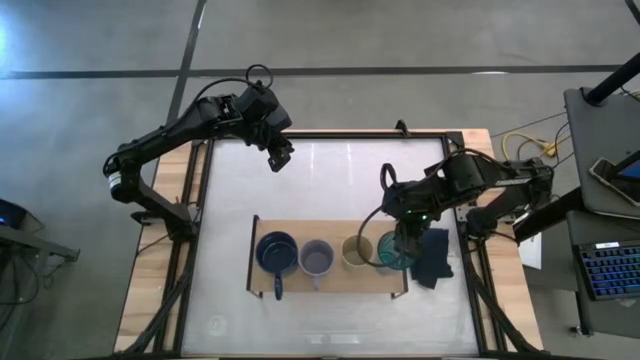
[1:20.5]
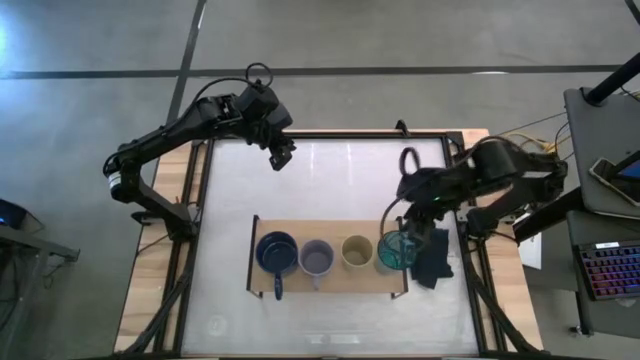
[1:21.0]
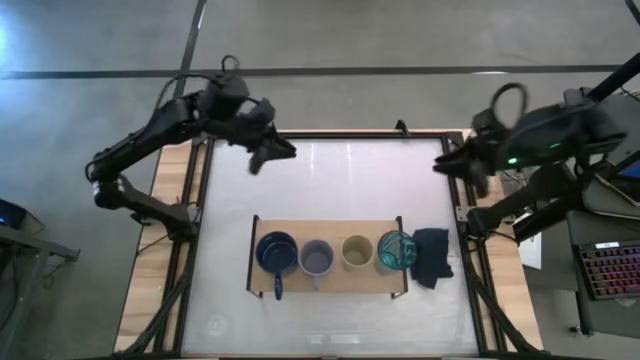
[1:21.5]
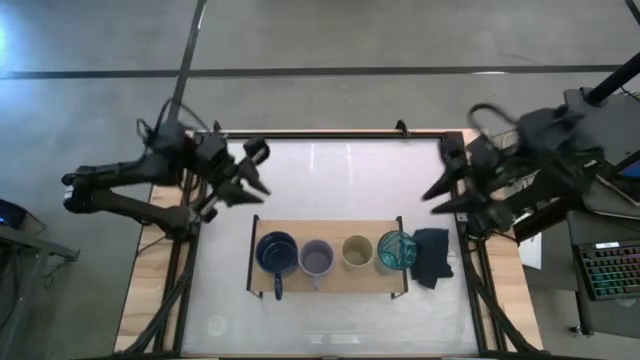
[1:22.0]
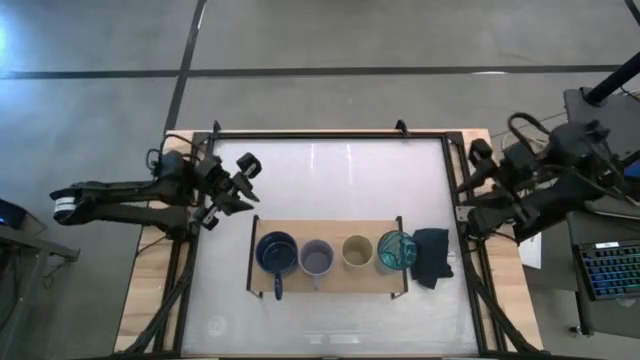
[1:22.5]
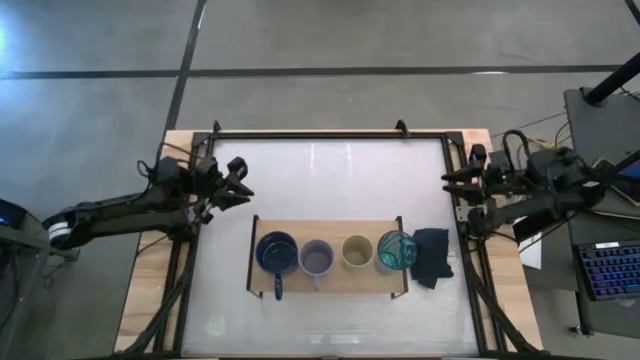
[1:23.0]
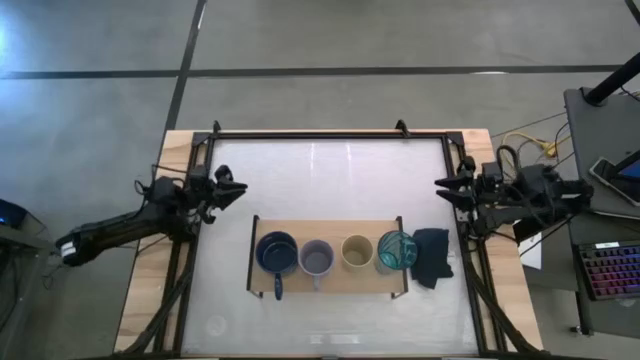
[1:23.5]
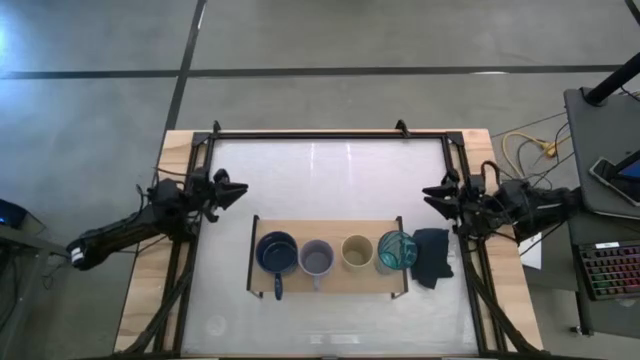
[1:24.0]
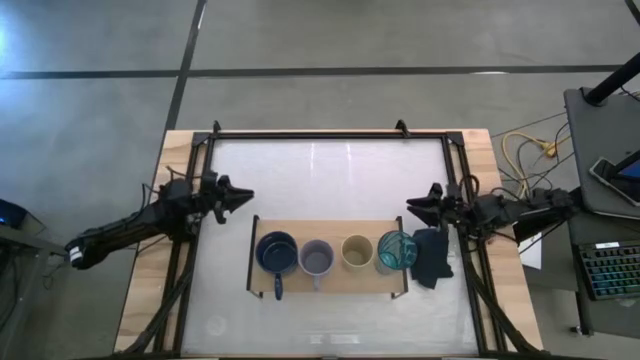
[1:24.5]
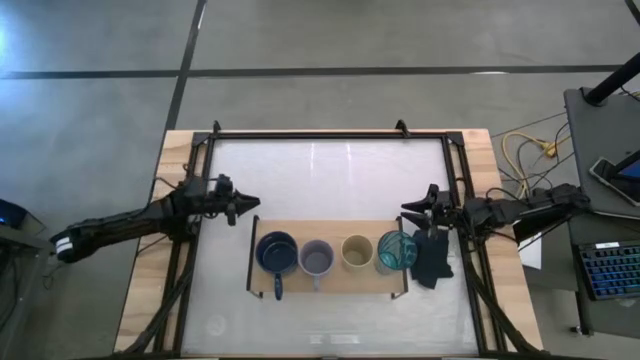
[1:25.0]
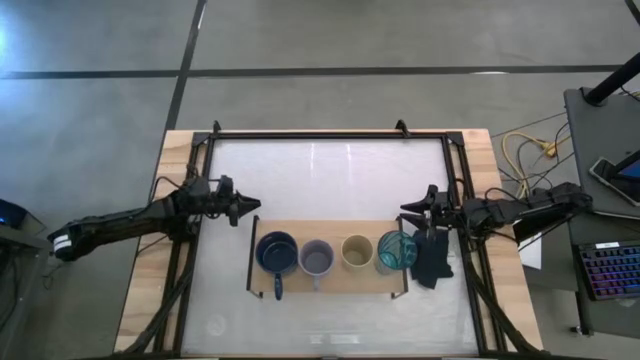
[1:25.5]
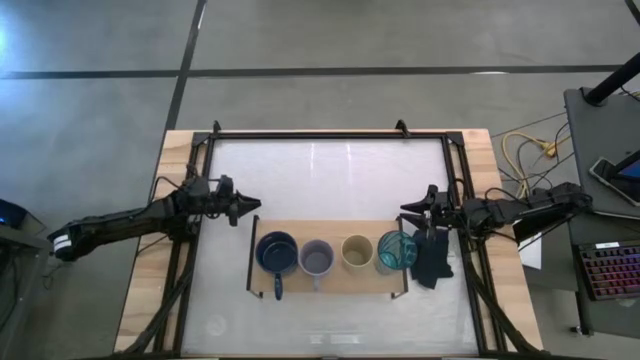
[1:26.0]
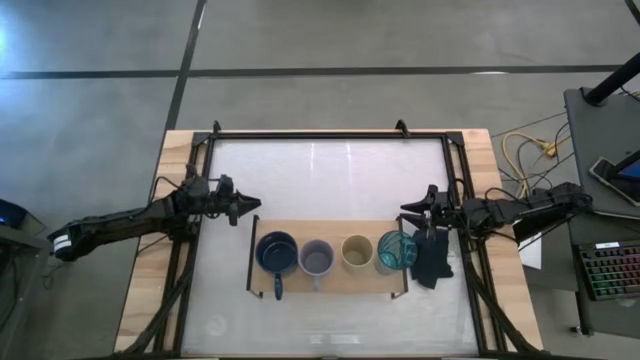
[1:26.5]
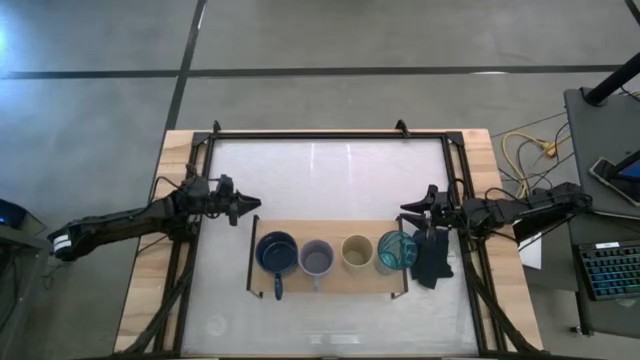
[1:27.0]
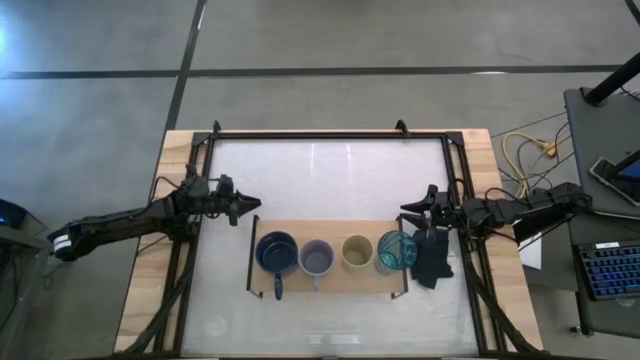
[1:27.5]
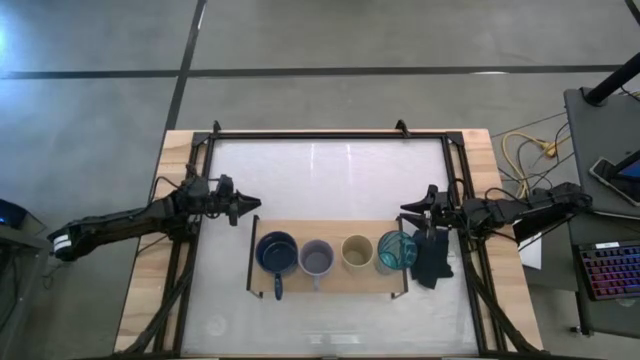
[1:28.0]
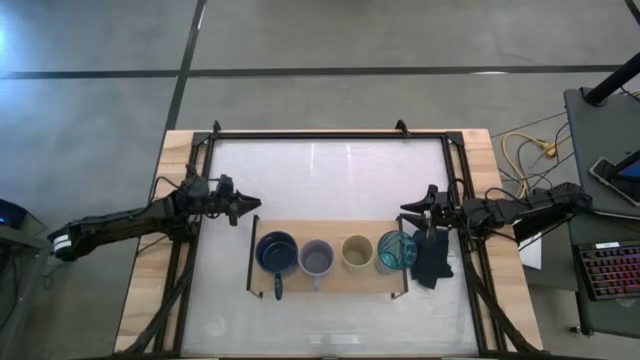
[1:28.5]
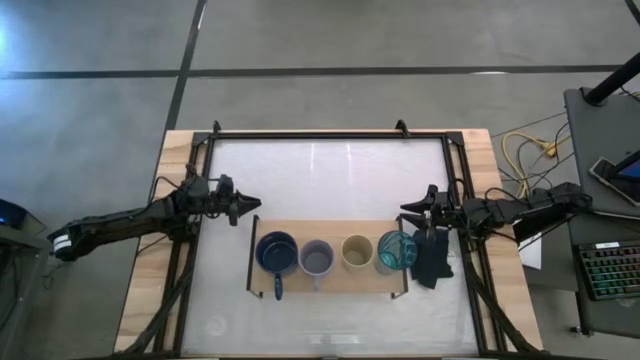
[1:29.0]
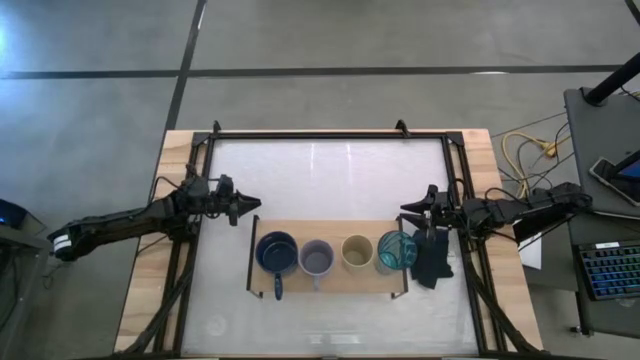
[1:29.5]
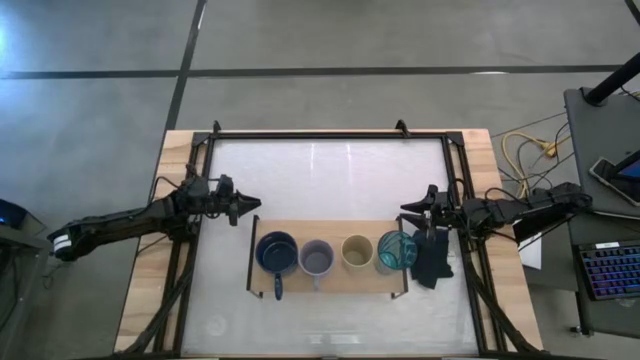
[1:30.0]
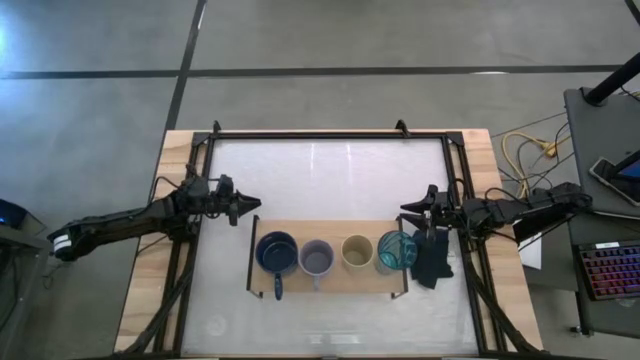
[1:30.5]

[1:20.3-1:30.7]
Task: Stack small to large cups/mugs on shelf
Return to Home Position

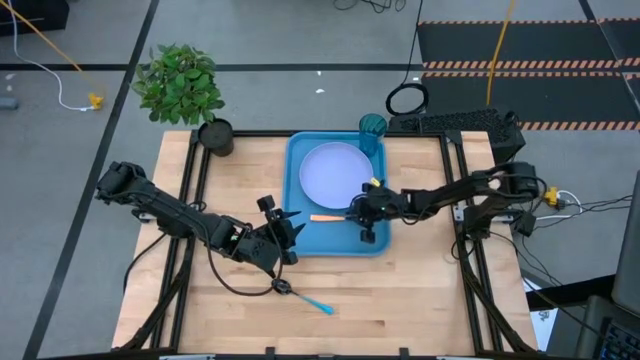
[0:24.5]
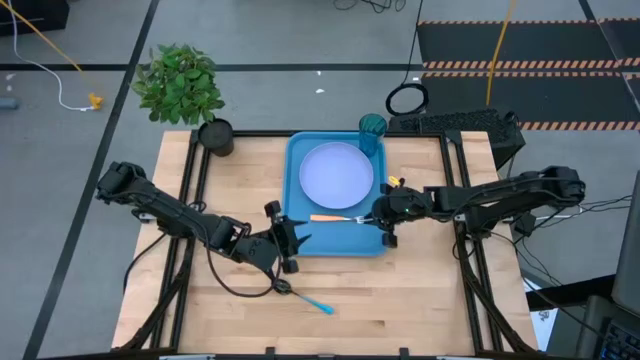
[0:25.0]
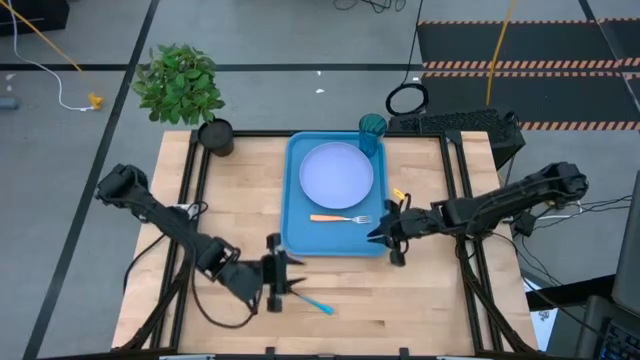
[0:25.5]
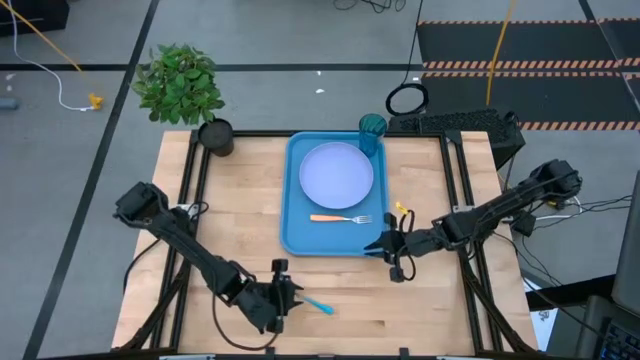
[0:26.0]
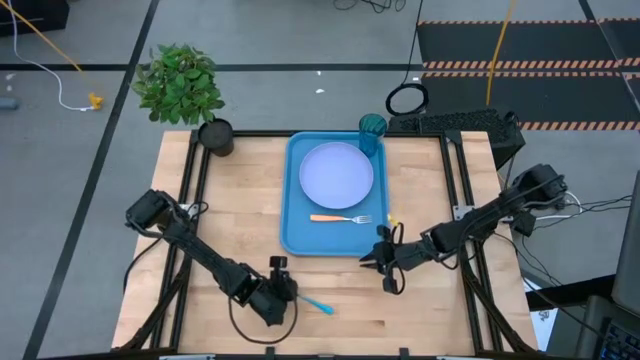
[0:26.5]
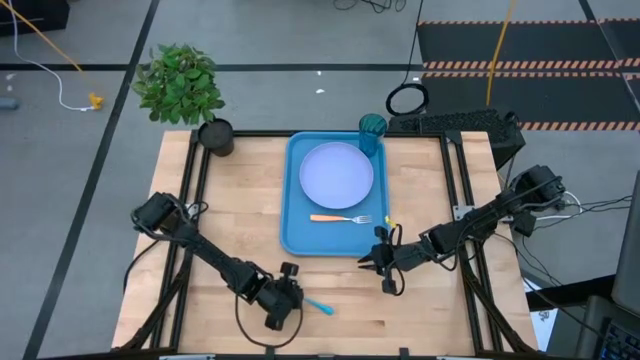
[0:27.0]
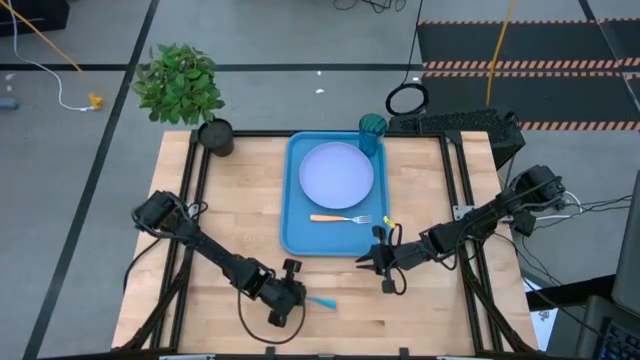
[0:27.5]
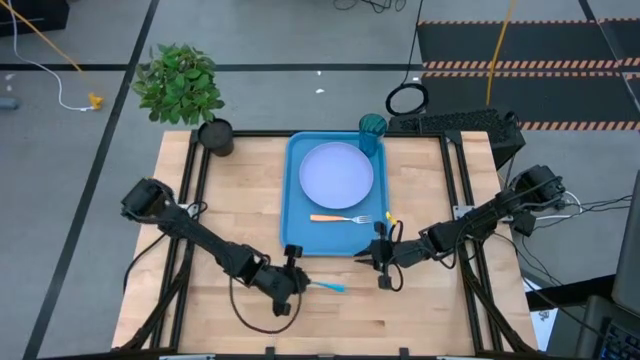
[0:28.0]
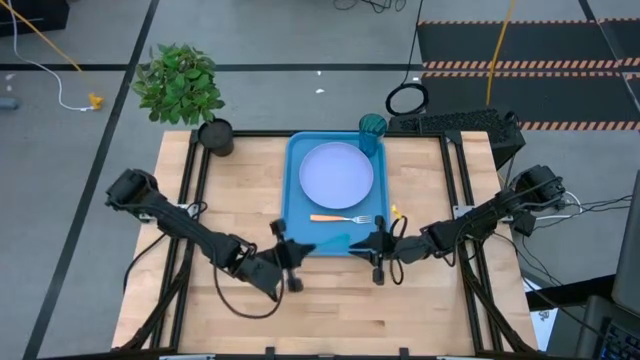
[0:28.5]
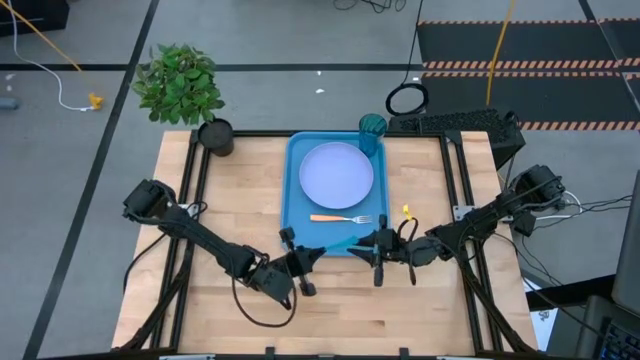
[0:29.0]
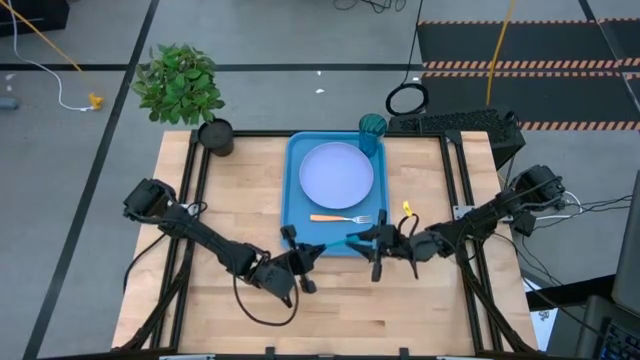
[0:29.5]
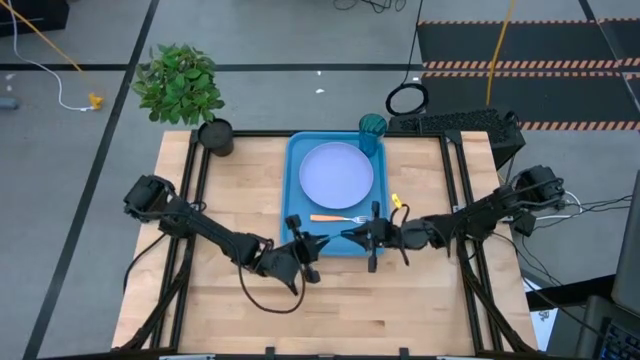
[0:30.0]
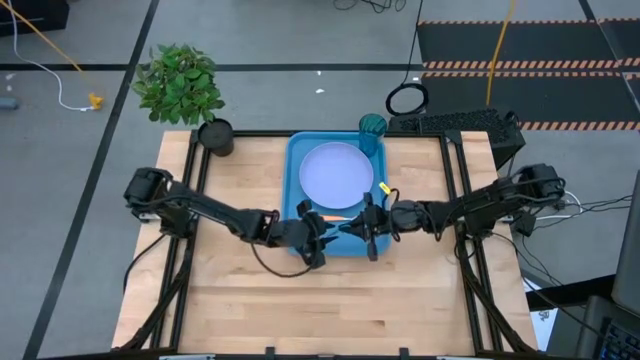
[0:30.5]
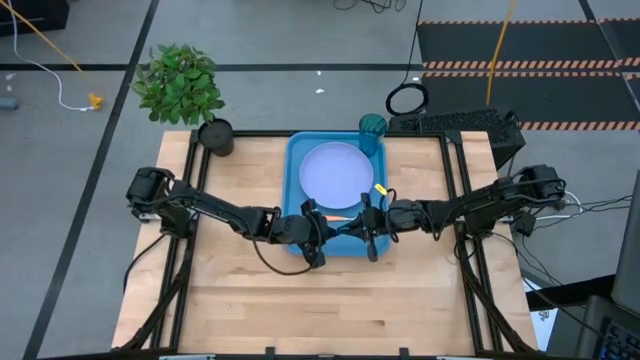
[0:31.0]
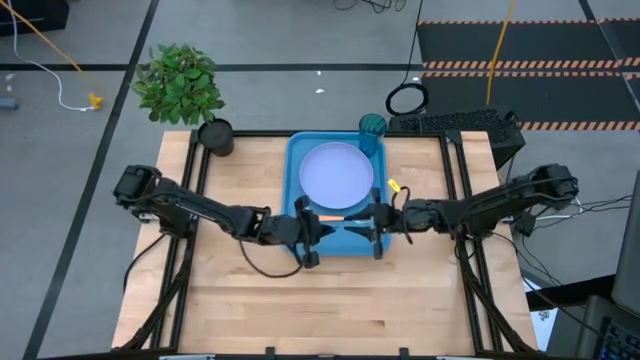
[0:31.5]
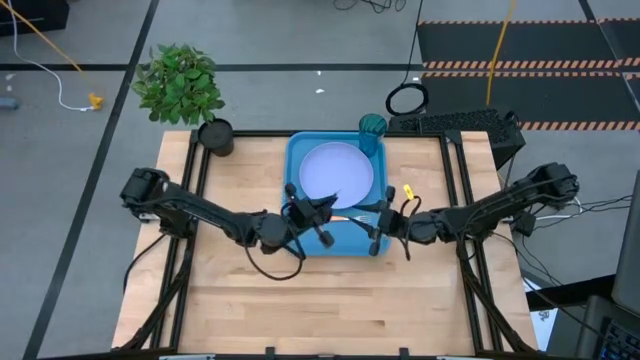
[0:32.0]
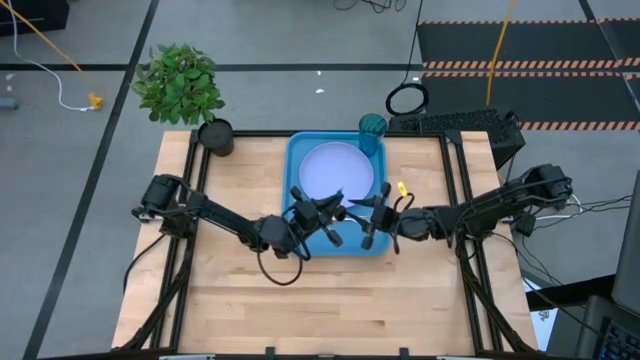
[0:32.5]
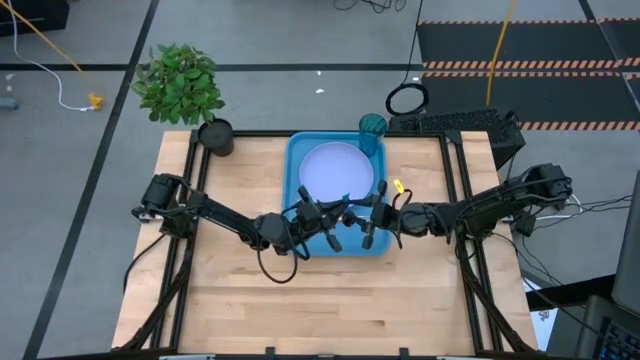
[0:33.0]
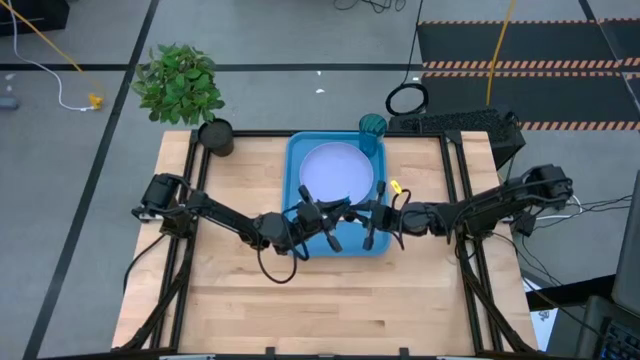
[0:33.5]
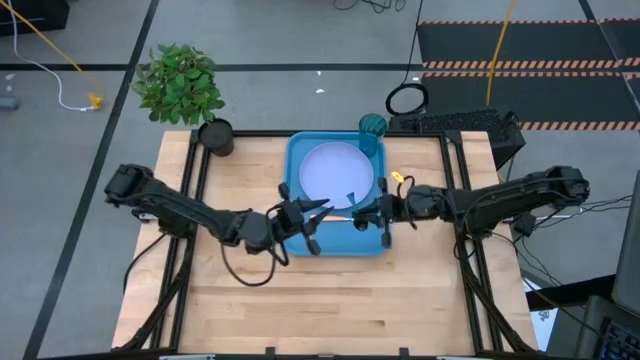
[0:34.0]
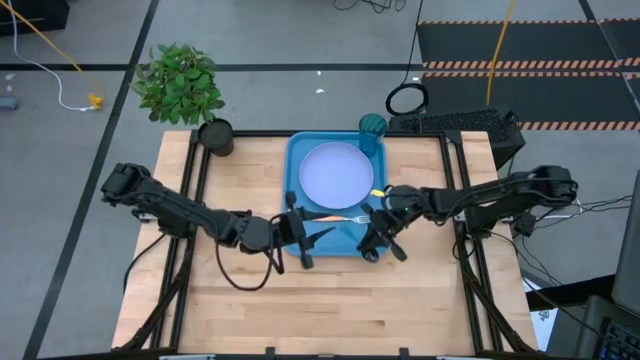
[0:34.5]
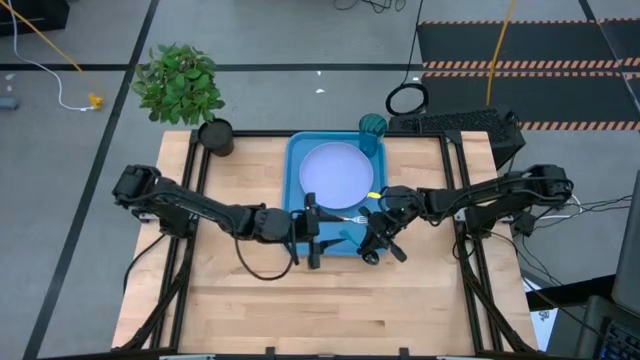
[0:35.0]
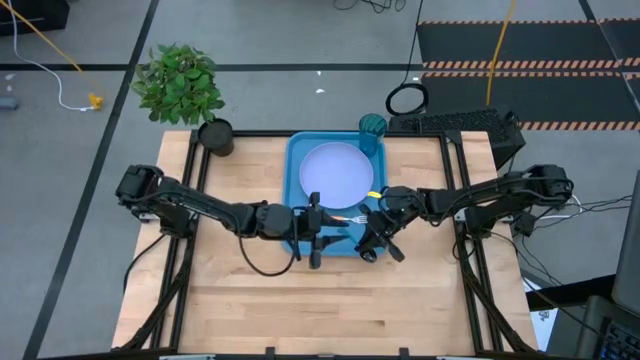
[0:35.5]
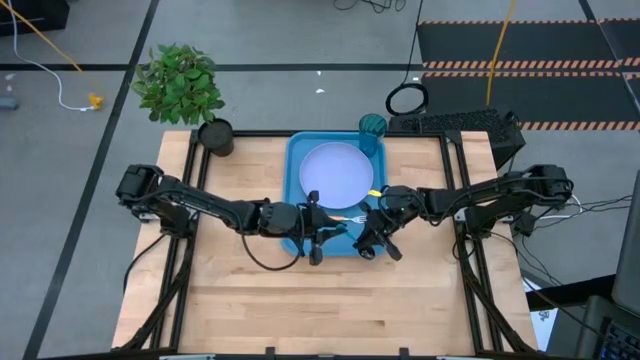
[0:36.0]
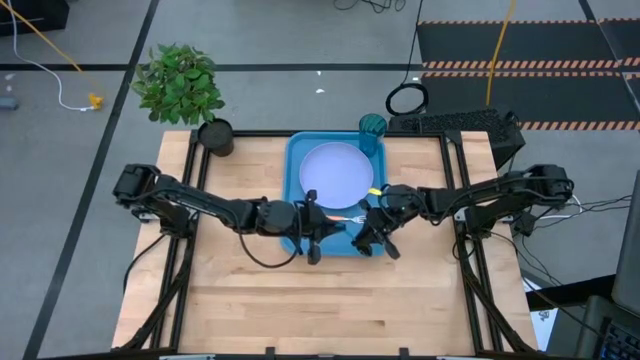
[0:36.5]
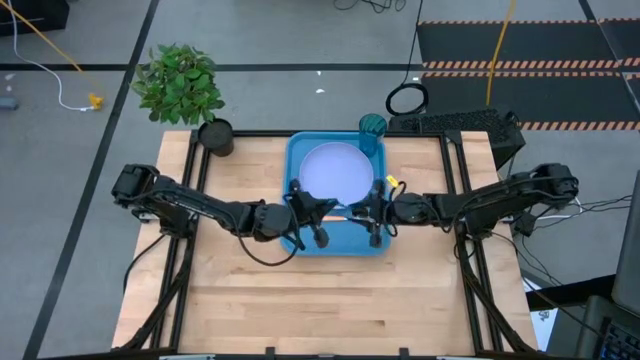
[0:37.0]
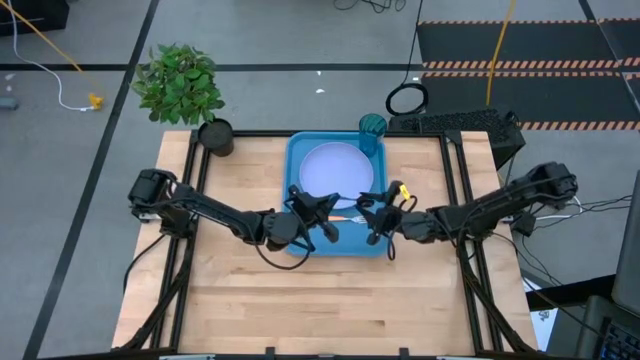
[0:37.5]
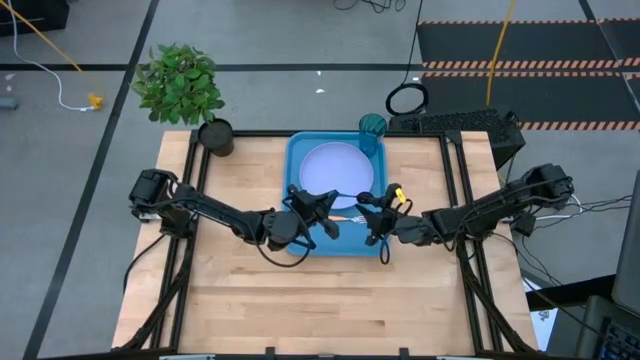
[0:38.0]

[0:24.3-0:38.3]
Task: Pick and place plate/cup/fork/spoon on tray
Put the blue spoon on the blue serving tray to the right of the orange fork
